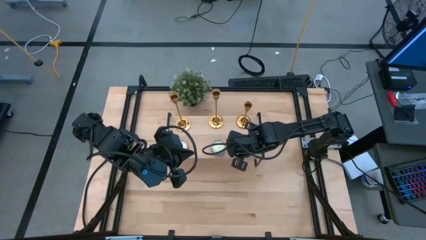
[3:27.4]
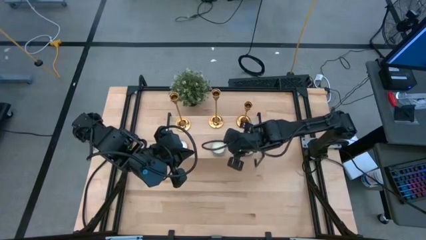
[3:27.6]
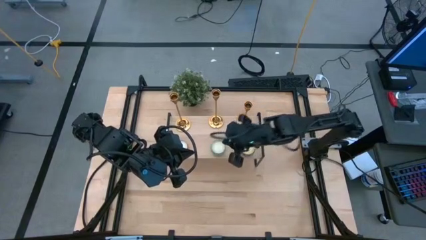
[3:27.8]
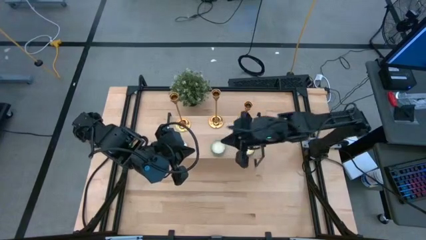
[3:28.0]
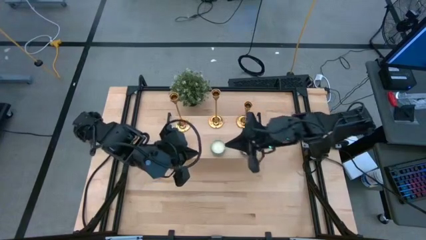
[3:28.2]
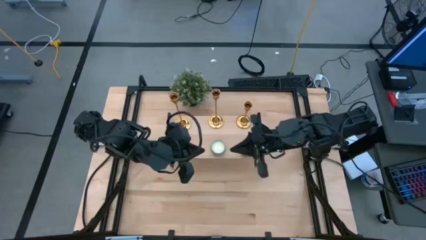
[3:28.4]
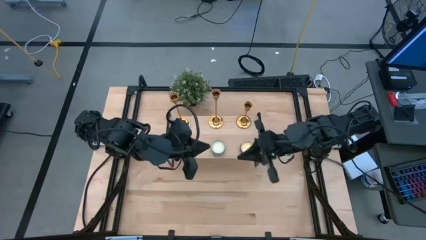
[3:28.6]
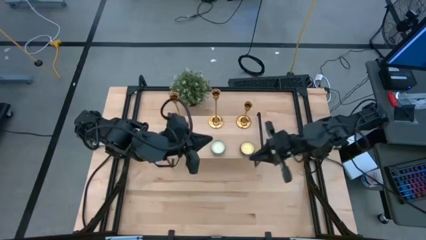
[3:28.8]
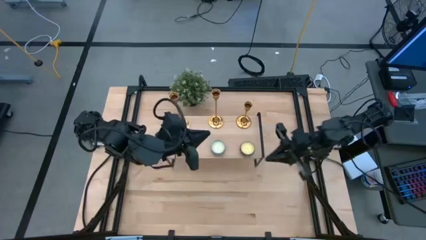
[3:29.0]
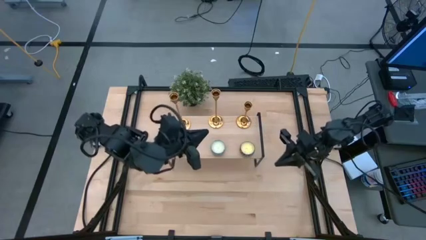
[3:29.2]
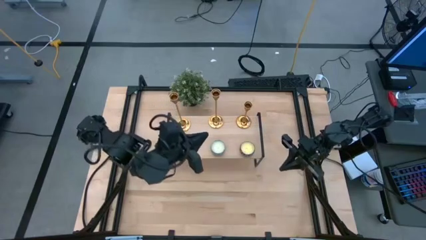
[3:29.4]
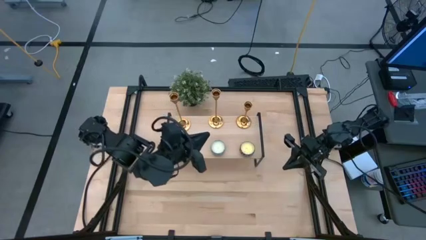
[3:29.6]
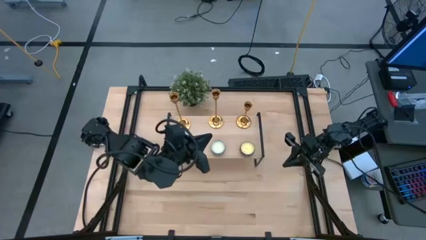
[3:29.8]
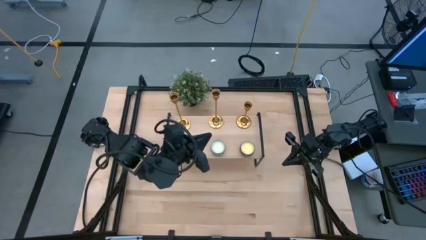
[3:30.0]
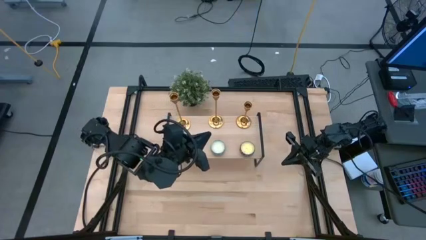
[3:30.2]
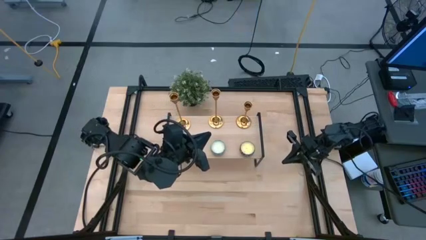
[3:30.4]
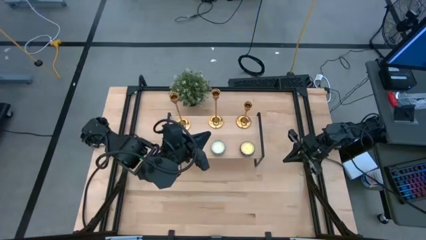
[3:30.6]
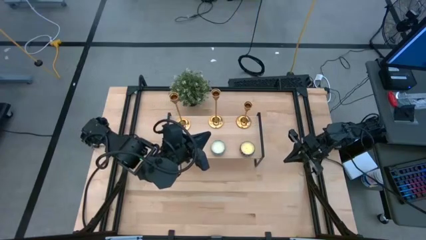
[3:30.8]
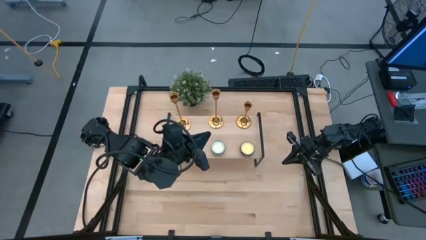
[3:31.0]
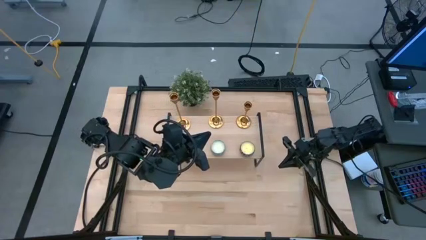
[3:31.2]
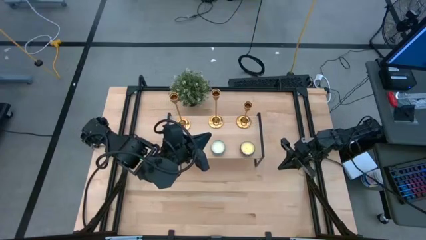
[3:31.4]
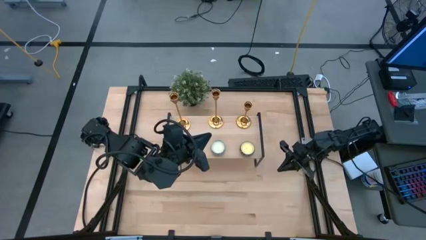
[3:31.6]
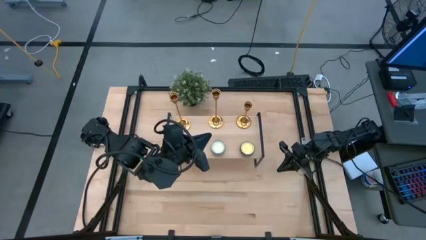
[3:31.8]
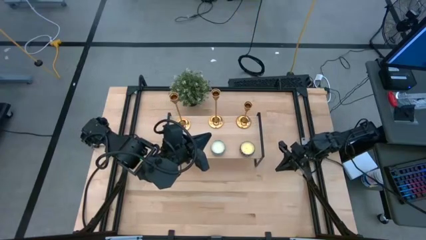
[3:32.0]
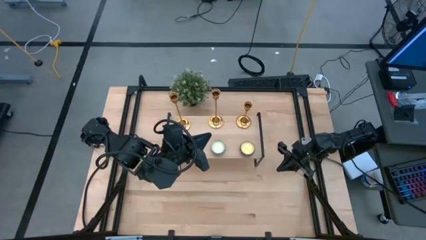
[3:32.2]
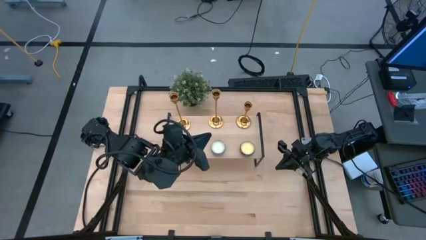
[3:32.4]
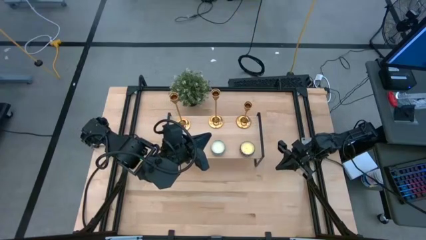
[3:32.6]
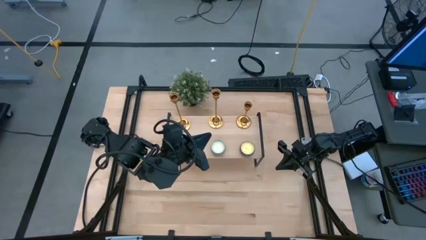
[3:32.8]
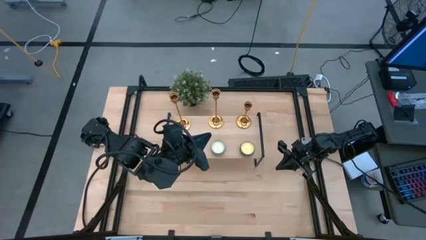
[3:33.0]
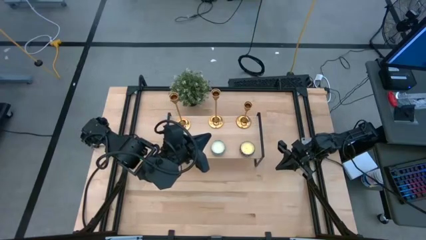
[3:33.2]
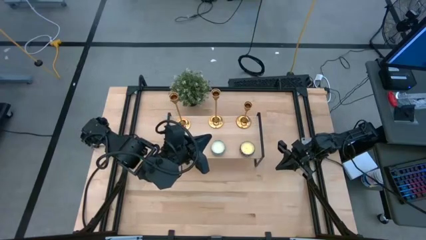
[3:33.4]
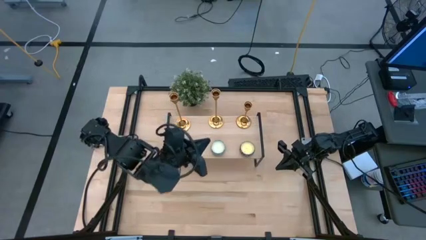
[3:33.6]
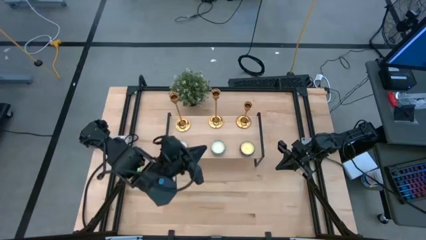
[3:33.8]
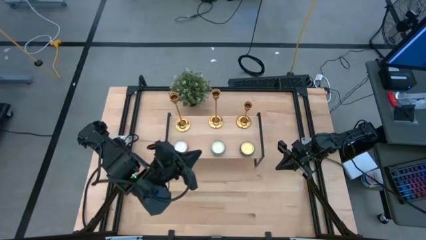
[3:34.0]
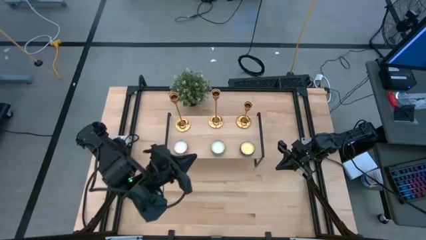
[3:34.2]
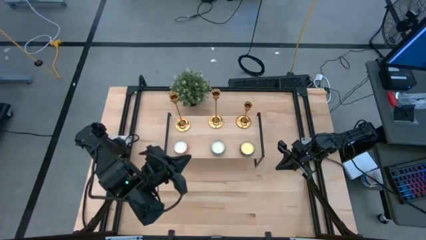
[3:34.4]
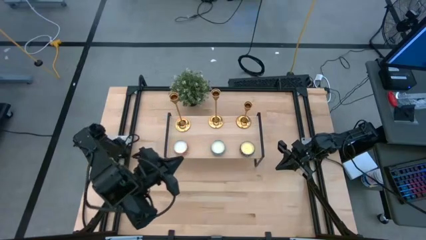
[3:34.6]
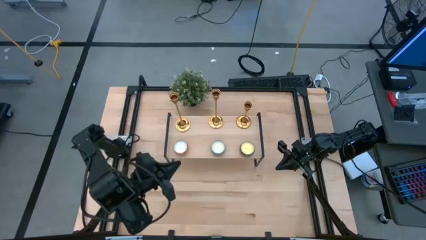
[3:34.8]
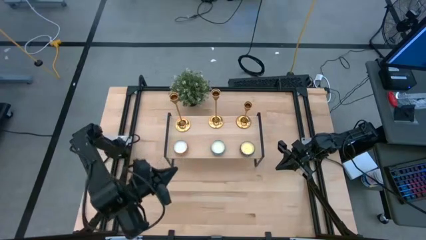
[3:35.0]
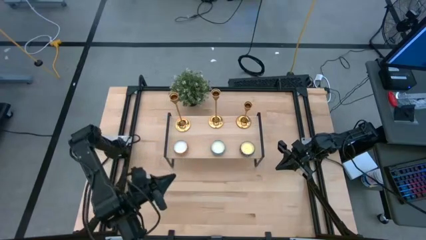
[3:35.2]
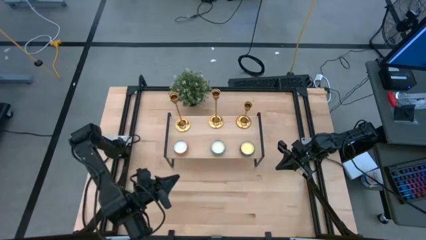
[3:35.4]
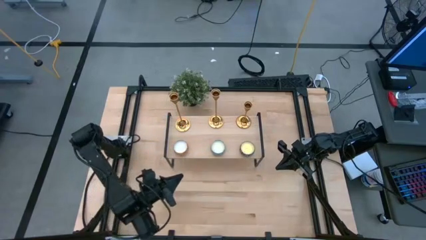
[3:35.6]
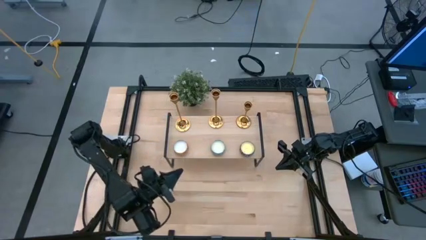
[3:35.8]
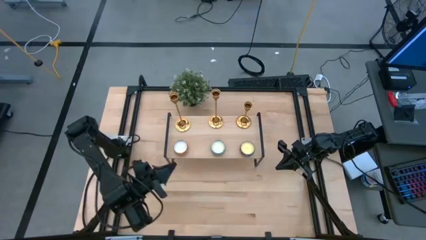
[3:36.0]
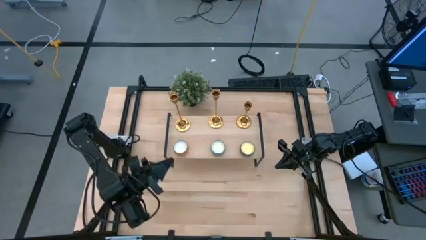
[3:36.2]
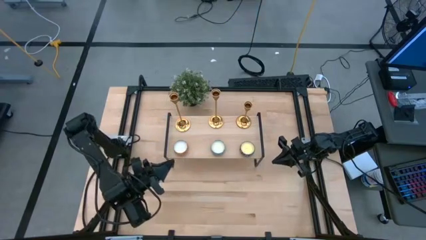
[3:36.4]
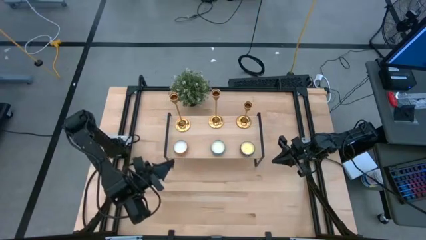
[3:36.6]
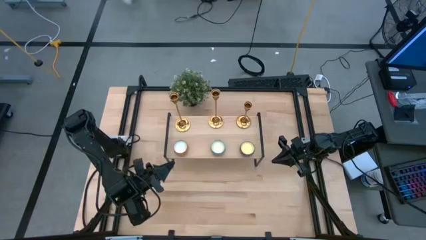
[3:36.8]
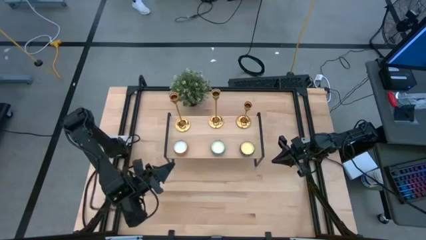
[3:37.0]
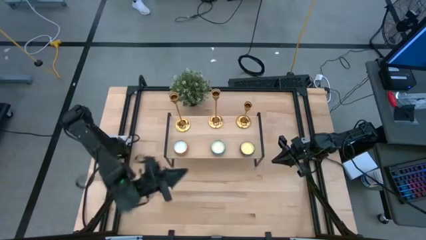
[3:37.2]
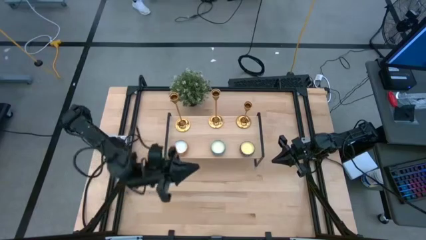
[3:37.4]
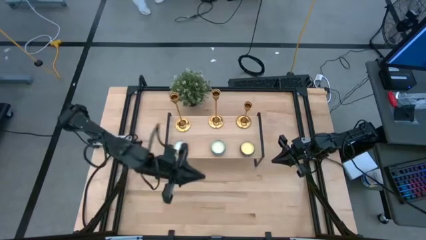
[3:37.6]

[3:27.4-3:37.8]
Task: Stock candles and holders on shelf
Return to Home Position
